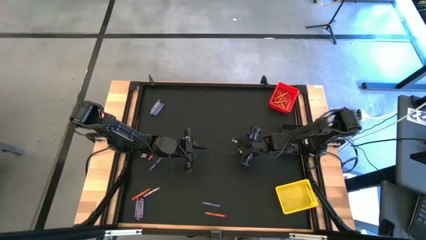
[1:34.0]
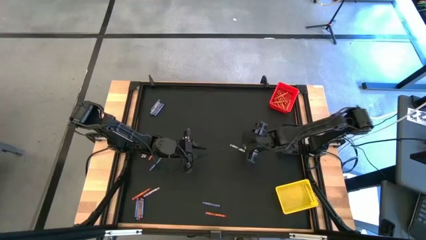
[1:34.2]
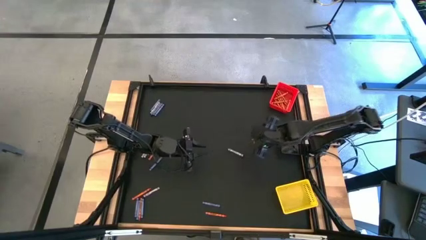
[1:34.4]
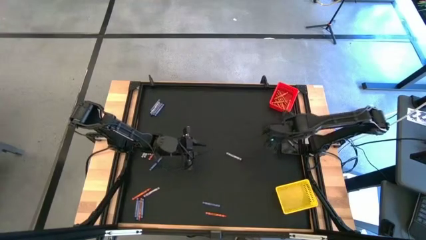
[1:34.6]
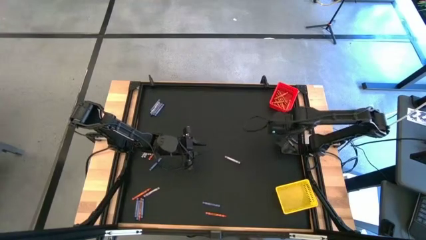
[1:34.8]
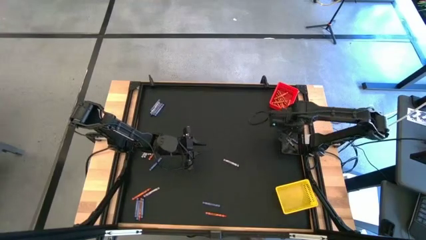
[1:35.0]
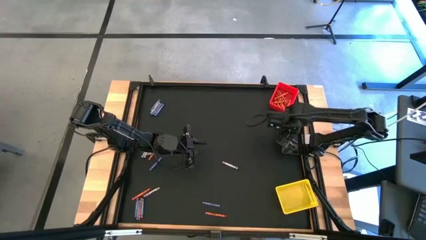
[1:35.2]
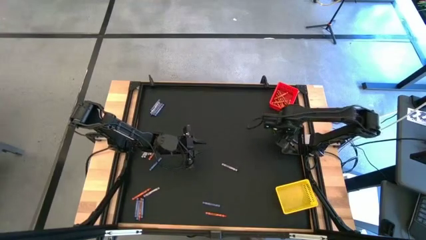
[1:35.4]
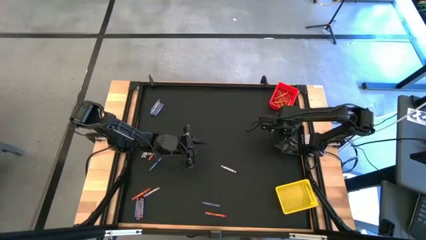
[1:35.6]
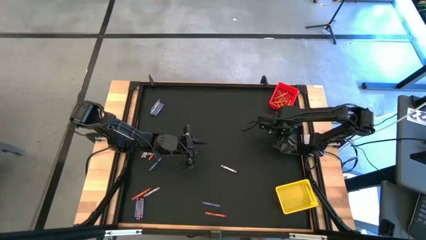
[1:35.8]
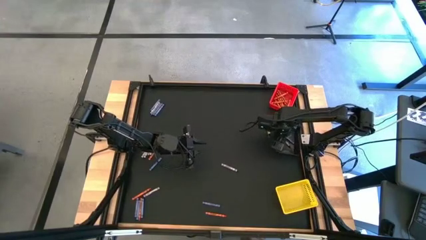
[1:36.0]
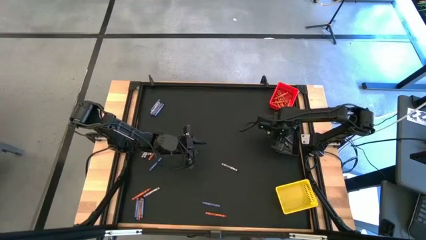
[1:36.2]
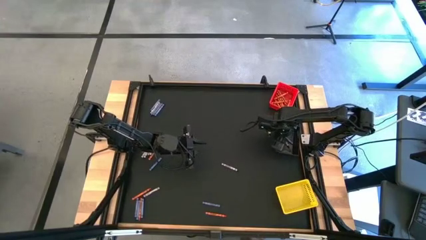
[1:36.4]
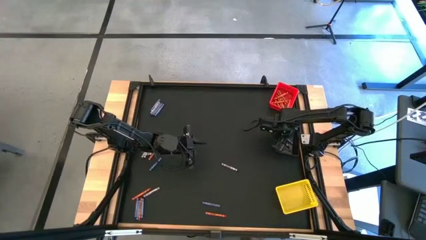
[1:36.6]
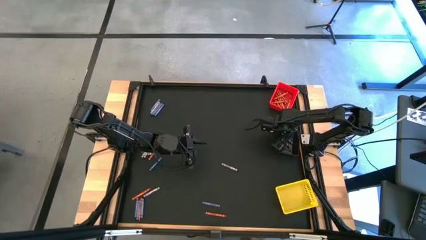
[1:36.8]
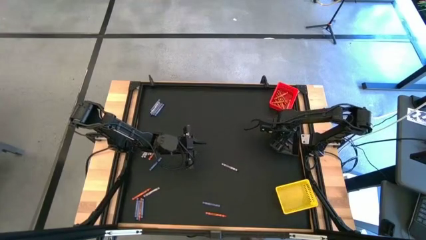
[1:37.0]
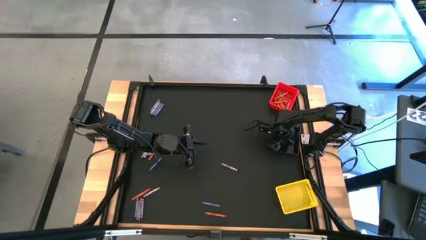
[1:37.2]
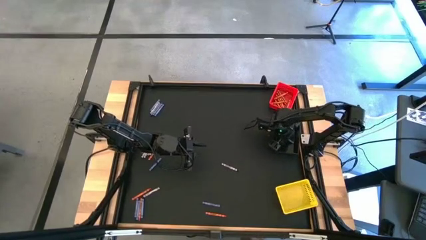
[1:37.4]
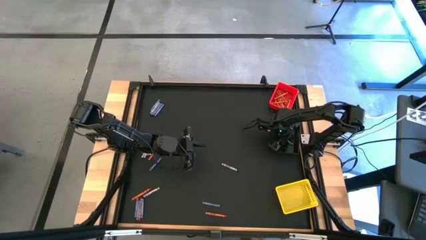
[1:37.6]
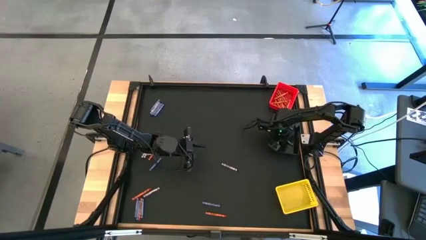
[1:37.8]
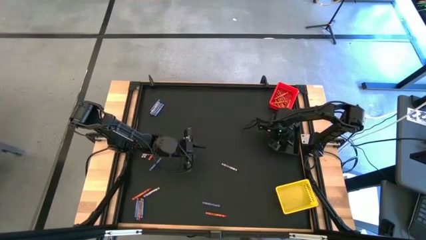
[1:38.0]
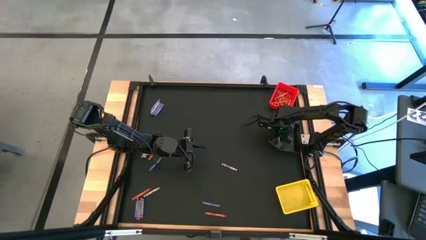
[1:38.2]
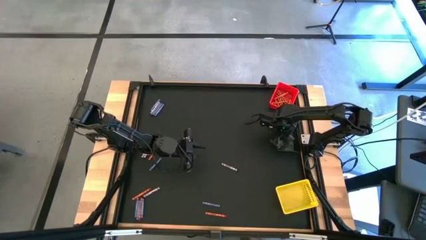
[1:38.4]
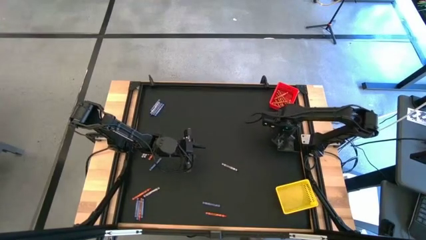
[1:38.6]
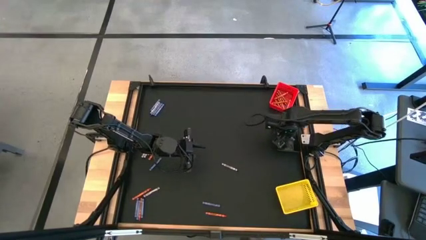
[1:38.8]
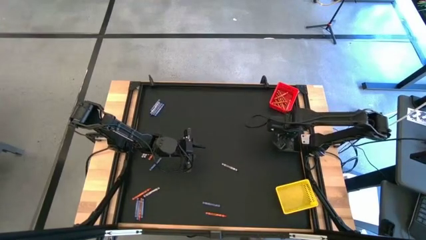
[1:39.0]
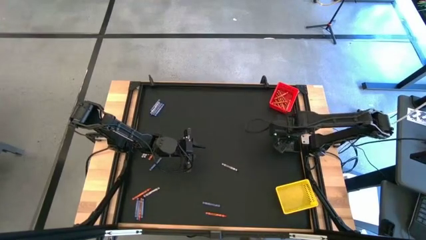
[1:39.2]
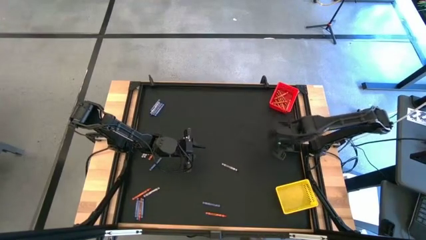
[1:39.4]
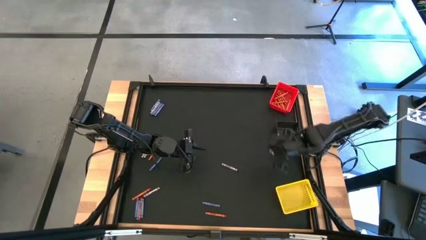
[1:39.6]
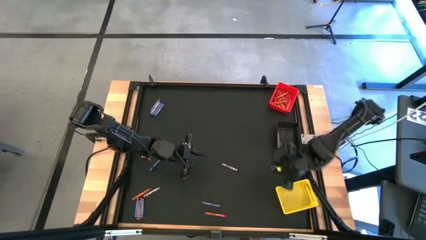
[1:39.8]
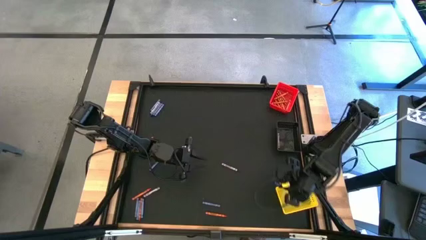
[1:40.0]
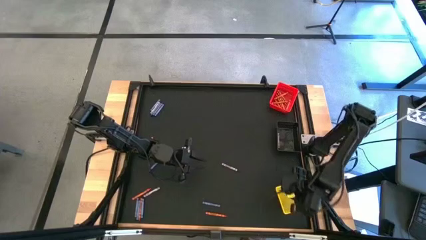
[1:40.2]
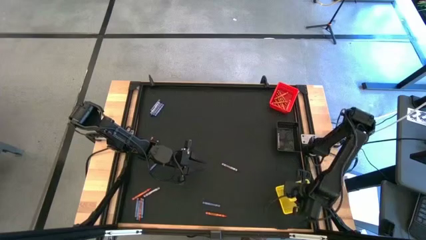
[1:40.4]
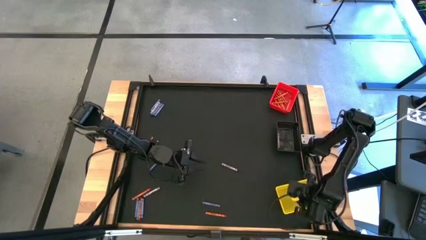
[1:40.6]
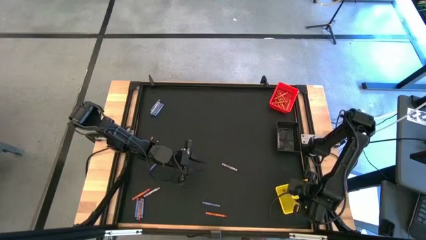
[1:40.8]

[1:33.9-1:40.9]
Task: Sort crayons
Put the blue crayon from the black bin to the yellow bin

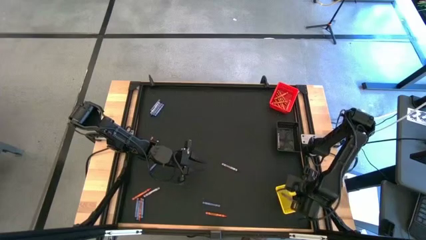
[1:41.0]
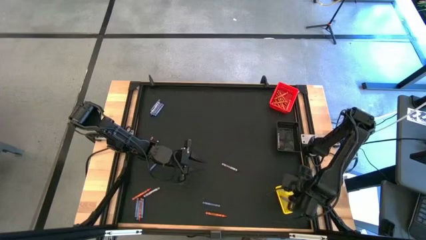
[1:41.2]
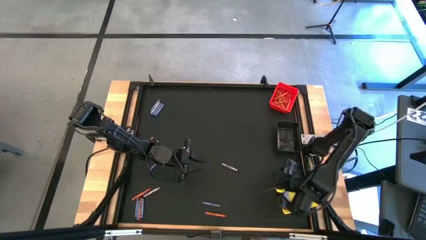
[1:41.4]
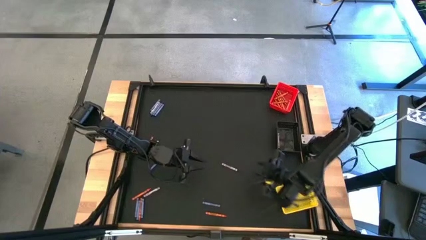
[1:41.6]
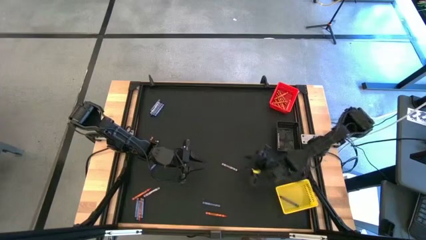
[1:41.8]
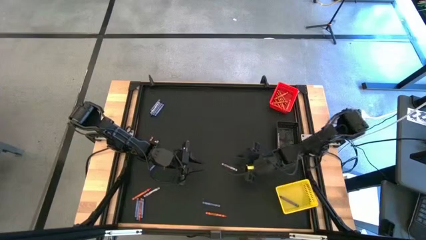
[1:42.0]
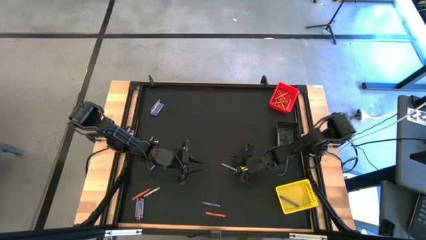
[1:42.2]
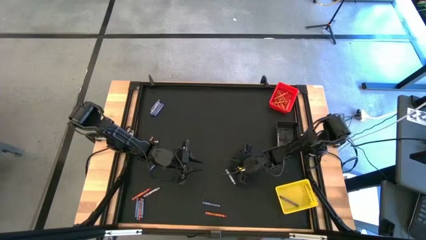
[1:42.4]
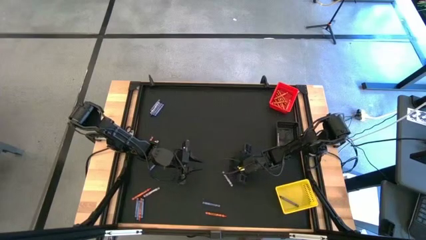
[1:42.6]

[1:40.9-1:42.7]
Put the black crayon into the black bin

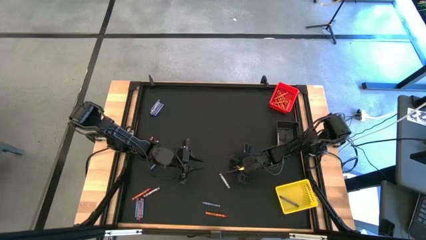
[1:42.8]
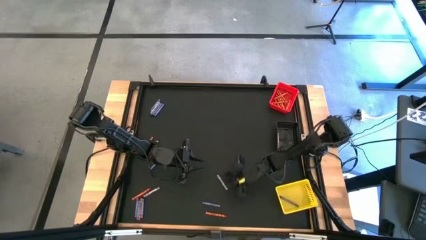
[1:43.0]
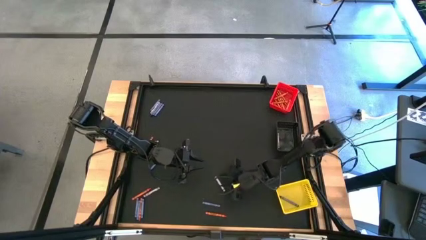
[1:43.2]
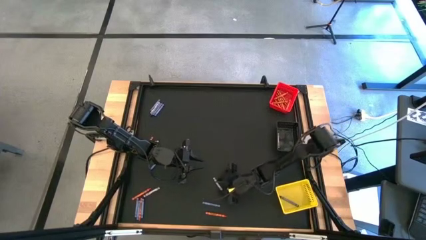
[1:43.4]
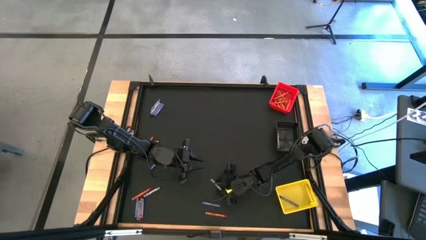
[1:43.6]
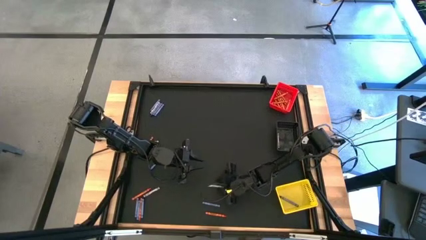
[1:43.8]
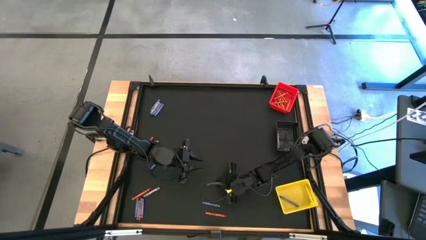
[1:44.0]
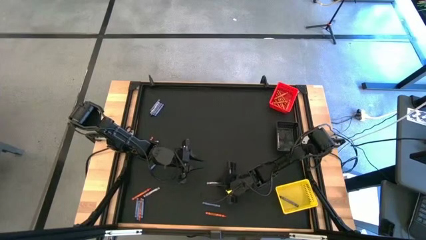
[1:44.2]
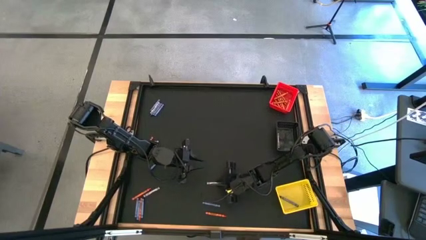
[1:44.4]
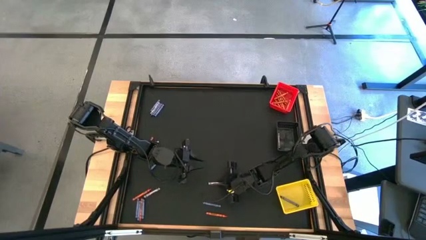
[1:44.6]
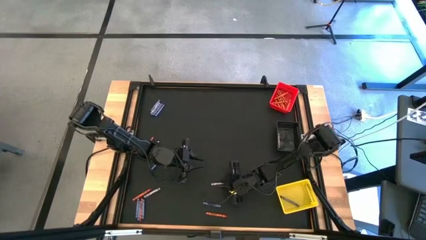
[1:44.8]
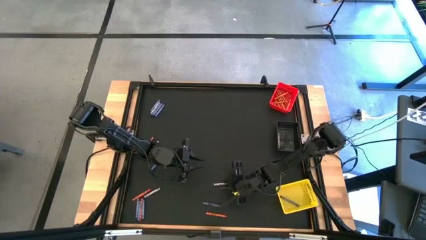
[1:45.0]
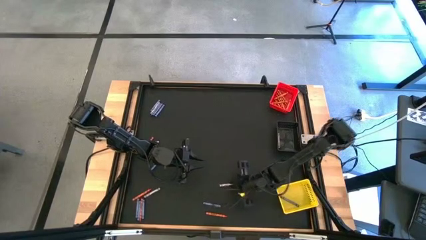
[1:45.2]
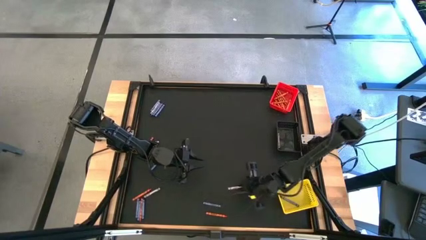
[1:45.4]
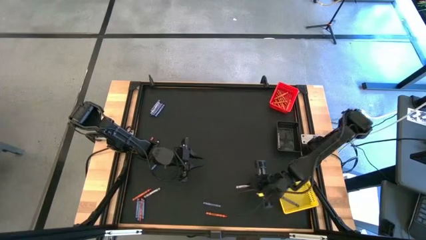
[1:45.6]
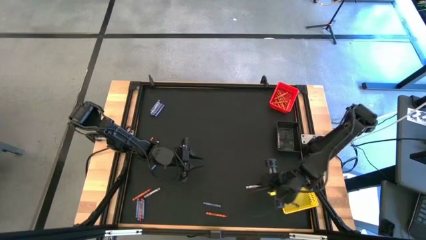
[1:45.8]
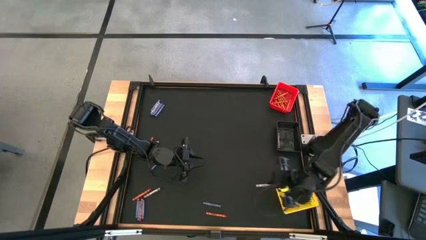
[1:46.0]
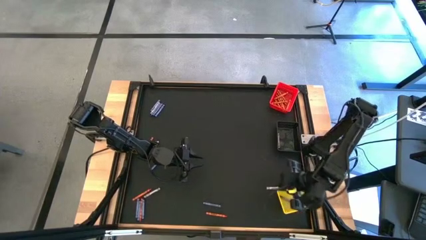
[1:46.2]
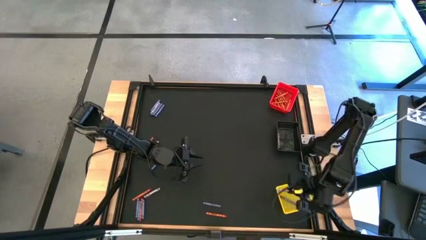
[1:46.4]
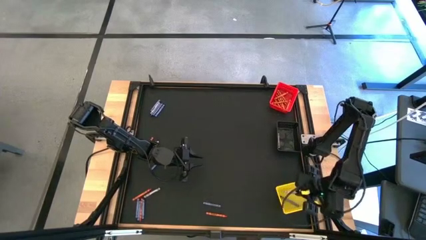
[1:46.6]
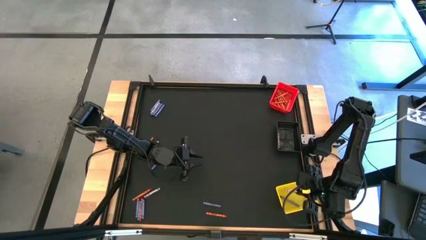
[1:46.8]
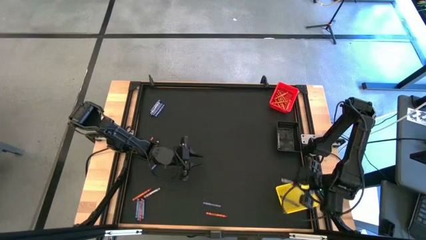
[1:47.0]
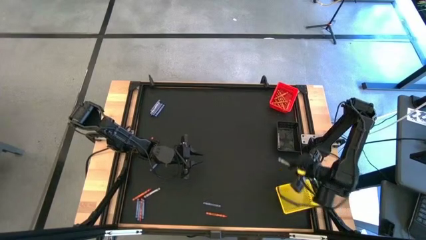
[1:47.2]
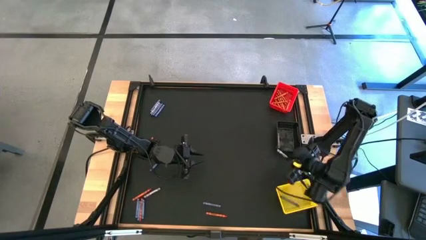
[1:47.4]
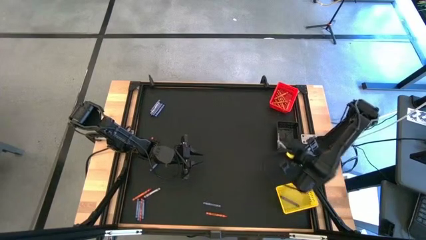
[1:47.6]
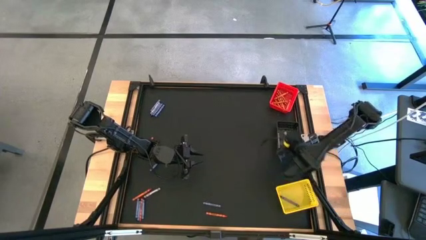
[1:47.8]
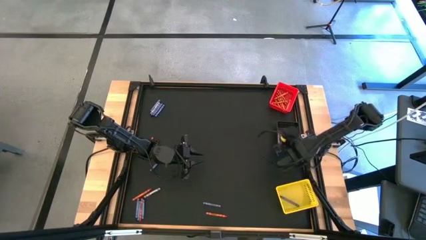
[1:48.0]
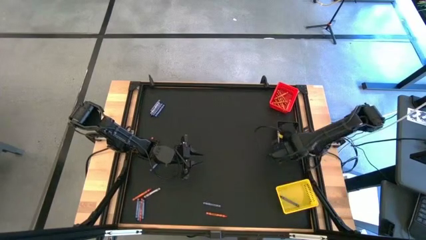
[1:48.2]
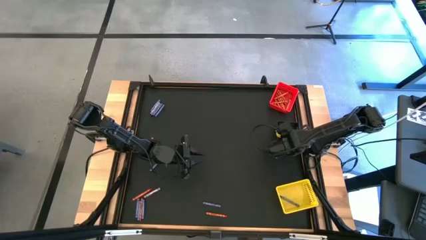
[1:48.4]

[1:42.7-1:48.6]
Put the black crayon into the black bin

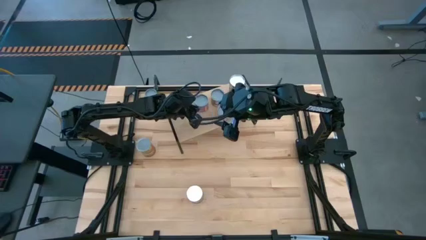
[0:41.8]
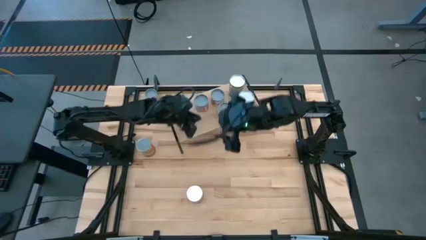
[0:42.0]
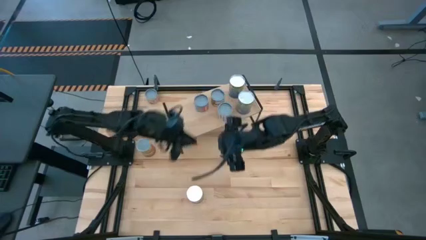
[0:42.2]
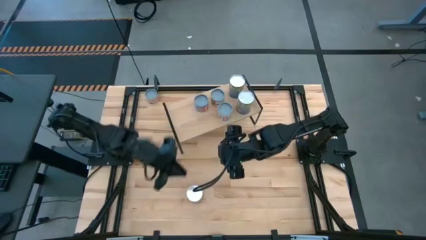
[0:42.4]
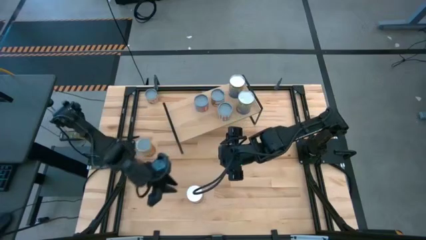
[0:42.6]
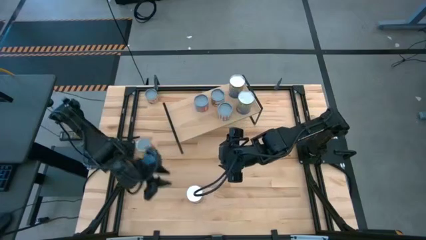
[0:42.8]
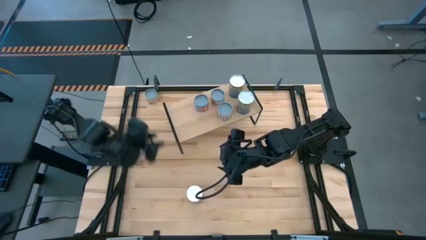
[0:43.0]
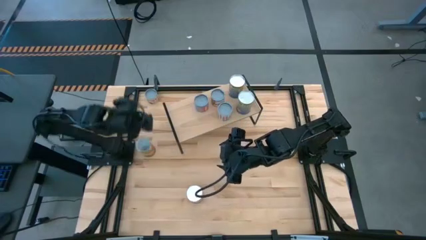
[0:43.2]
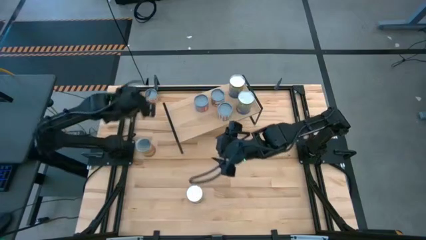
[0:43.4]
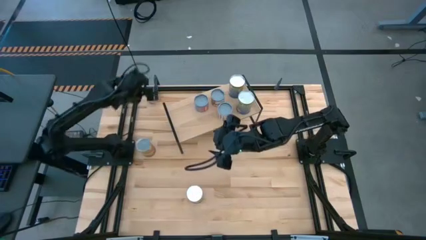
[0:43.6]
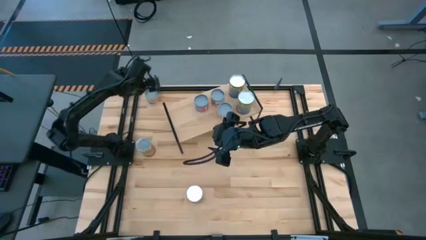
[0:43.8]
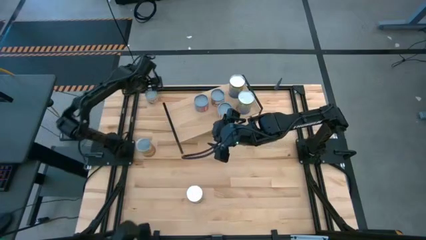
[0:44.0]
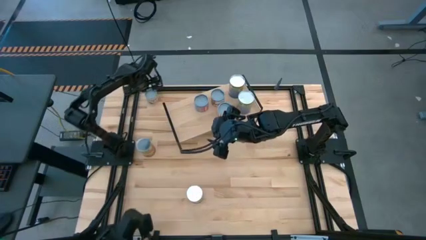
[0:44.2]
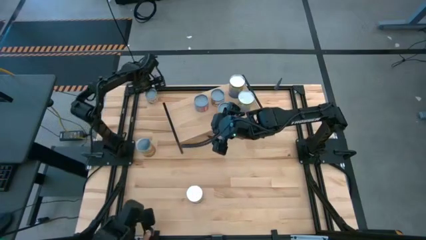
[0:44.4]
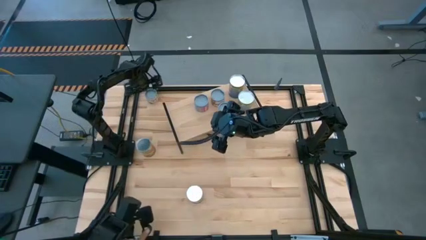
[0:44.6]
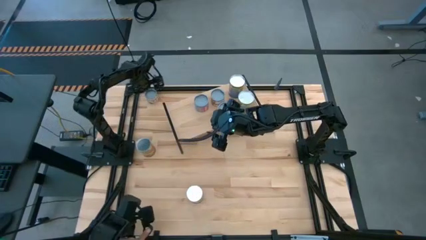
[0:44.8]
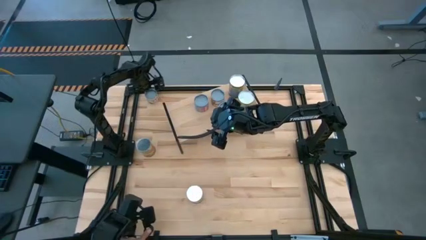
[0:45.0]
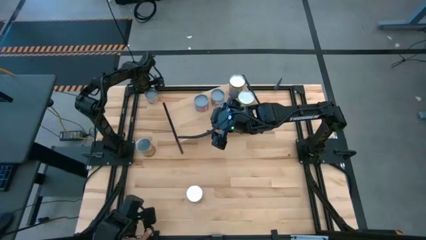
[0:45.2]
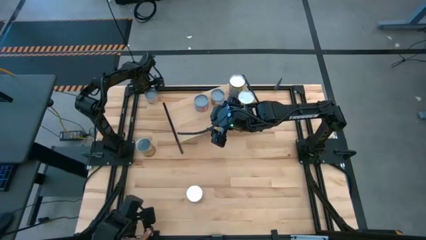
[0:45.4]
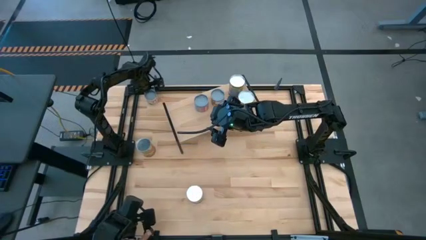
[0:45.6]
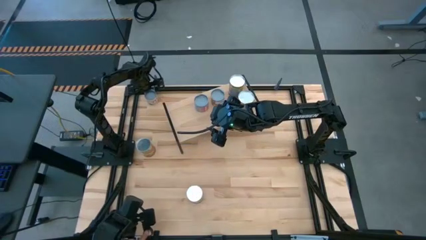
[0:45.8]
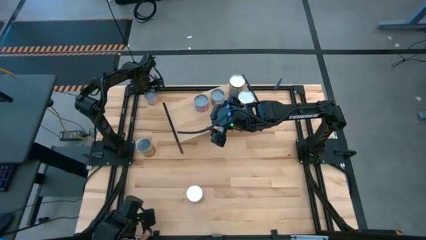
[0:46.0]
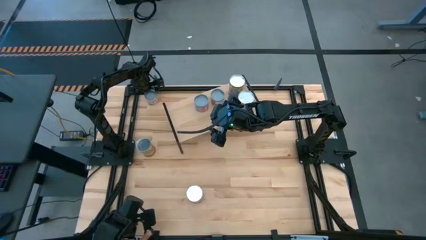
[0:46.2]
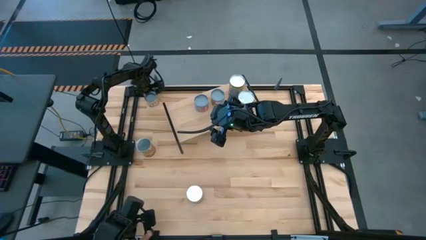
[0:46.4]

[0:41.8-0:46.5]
Task: Pick and place cans onto a shelf
Put the canned green peas on the shelf
